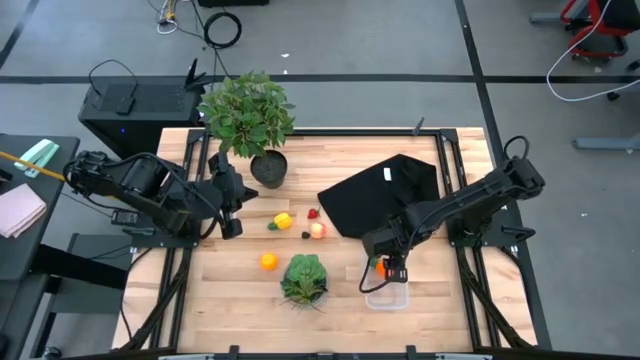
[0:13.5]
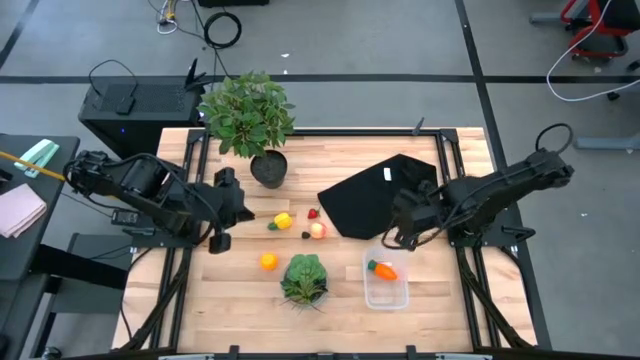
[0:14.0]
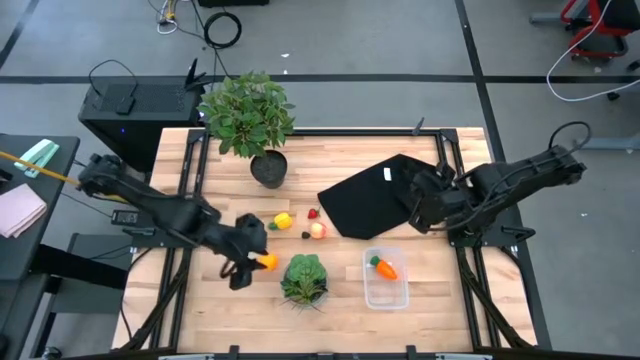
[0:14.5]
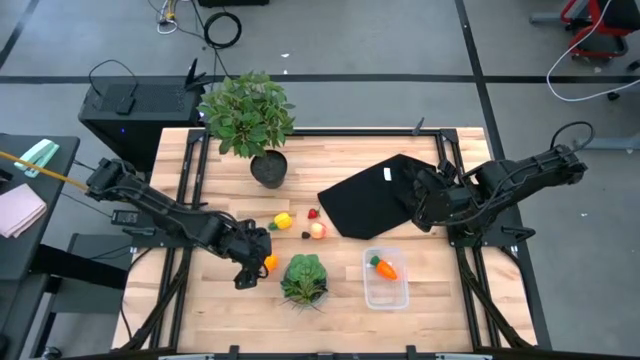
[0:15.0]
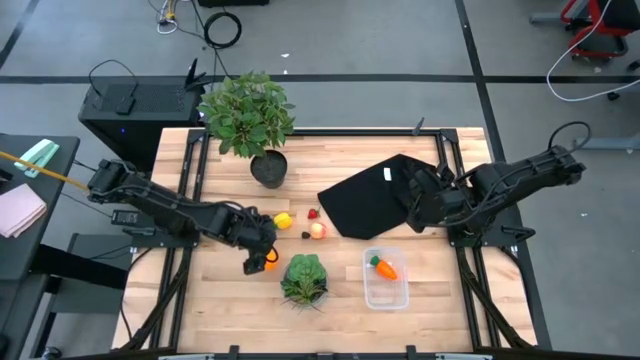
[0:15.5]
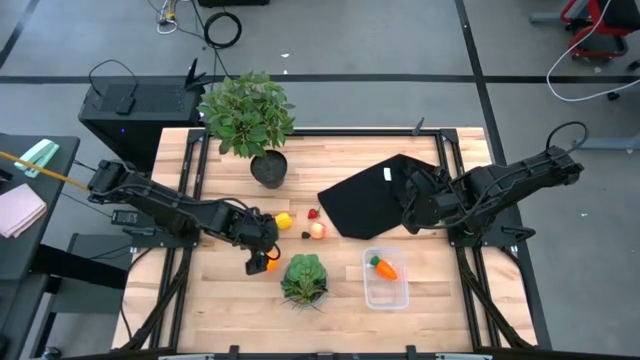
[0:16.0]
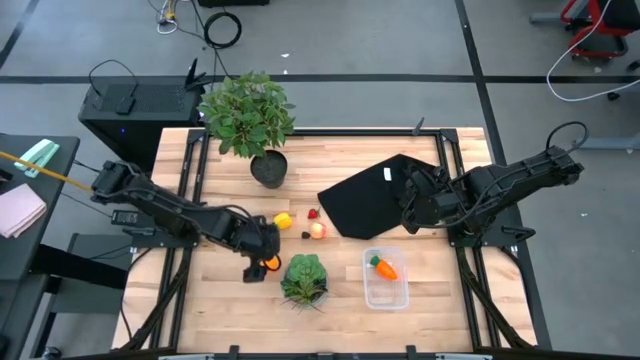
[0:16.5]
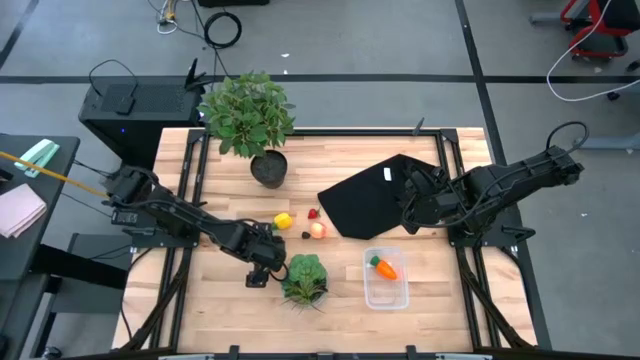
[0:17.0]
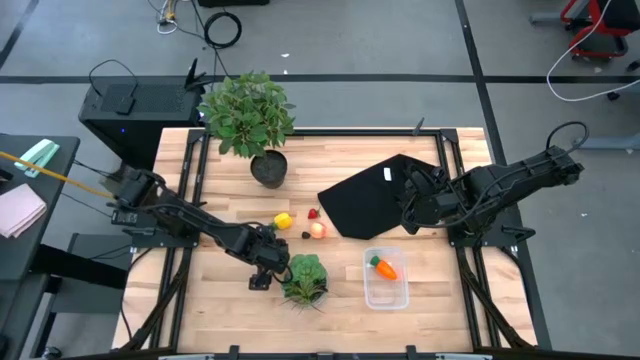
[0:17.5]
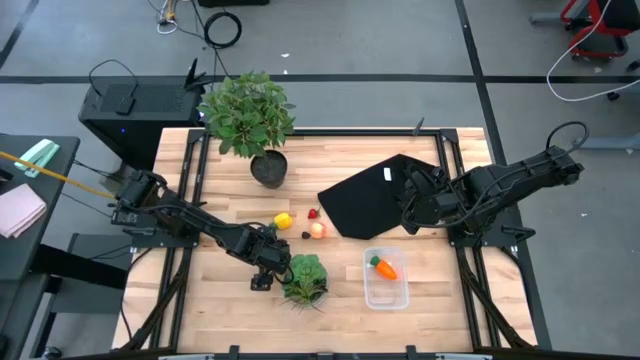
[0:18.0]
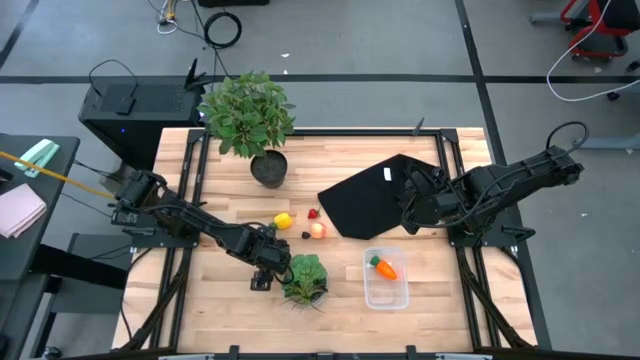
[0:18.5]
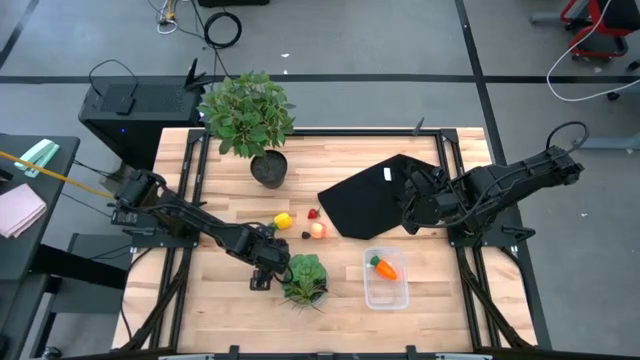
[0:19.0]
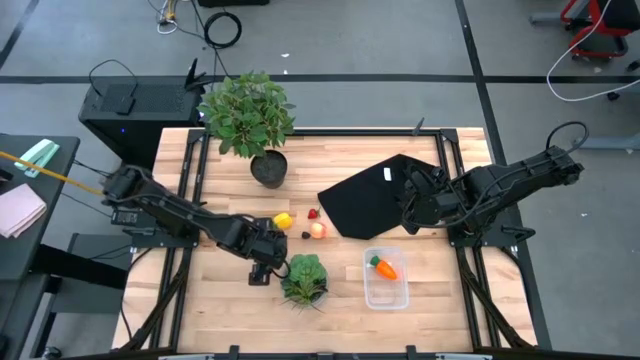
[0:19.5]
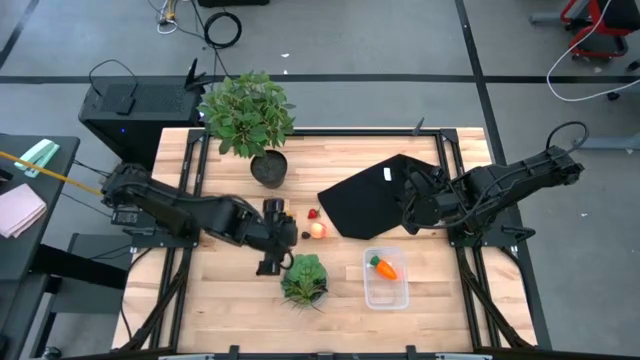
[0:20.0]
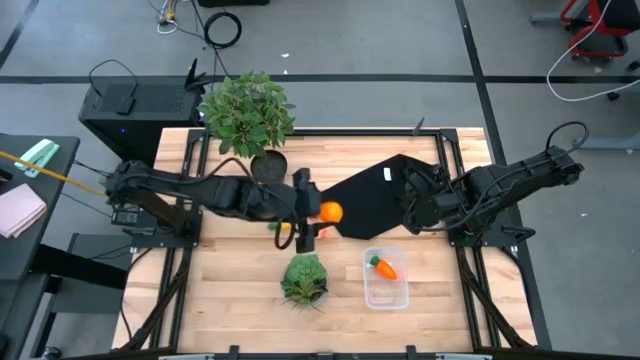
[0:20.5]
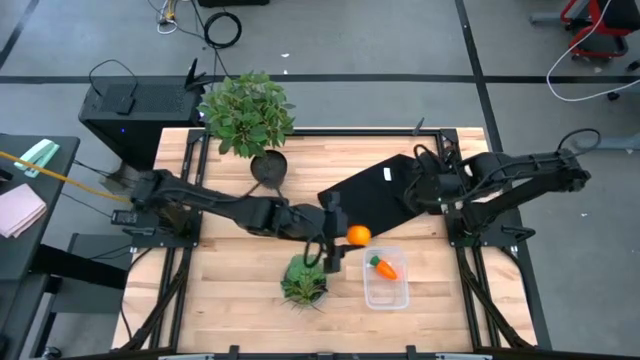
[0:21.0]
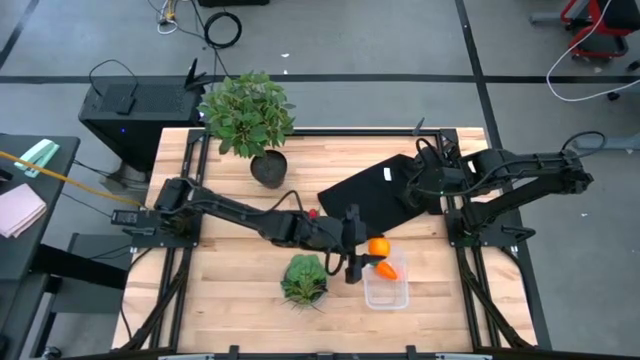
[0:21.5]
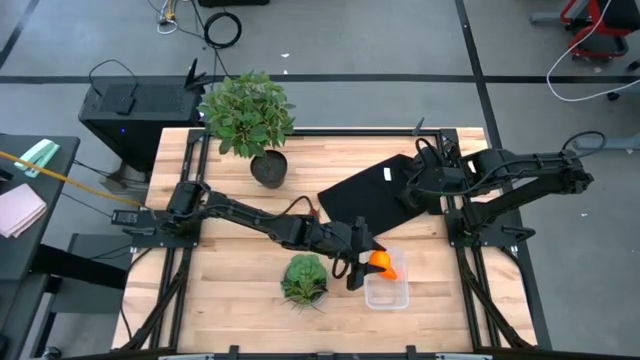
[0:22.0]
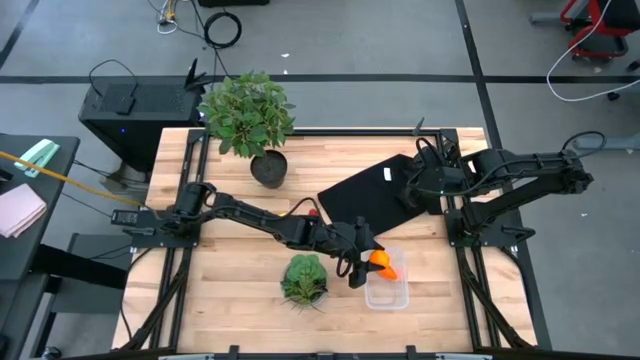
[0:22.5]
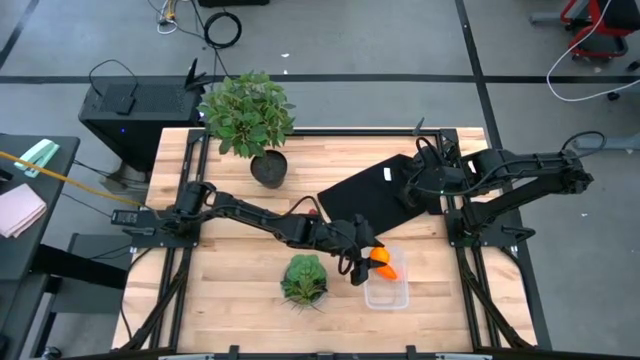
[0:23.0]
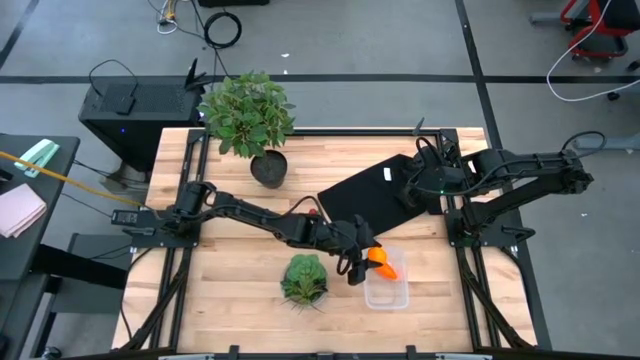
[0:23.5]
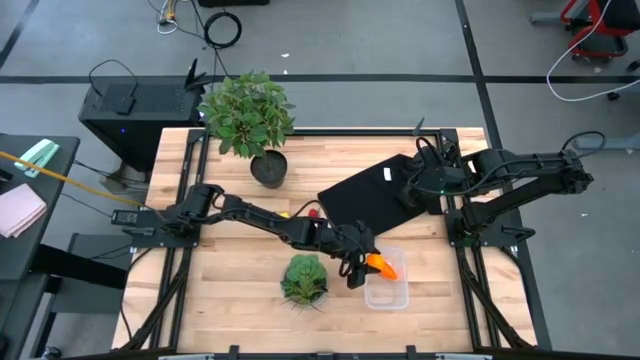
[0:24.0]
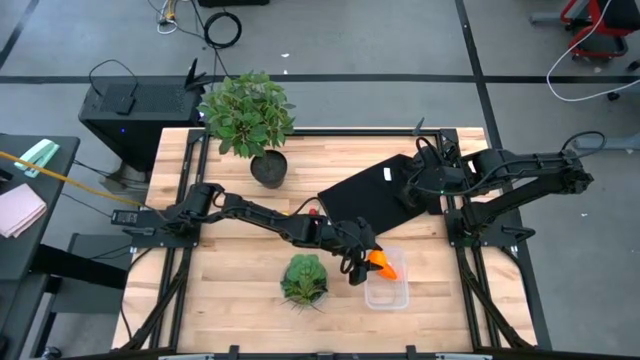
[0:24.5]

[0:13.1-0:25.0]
Task: Pick and placing Produce into tupperware
Put the orange into the transparent bin

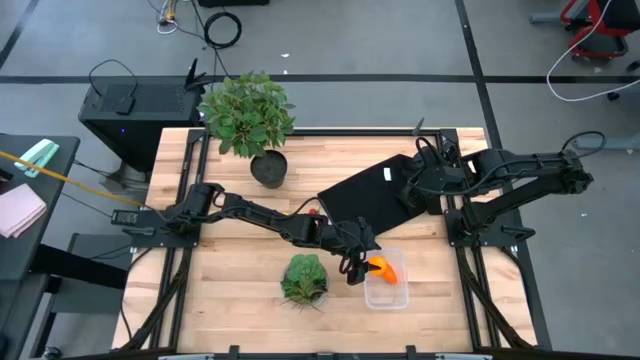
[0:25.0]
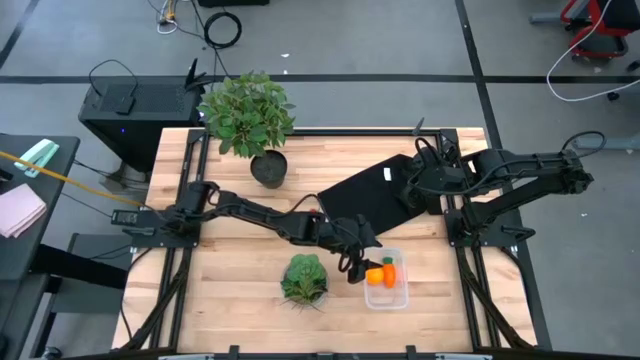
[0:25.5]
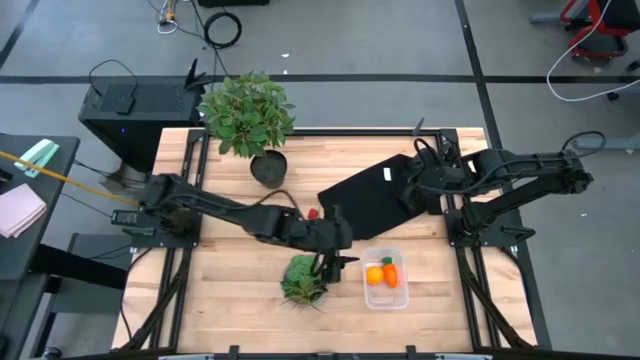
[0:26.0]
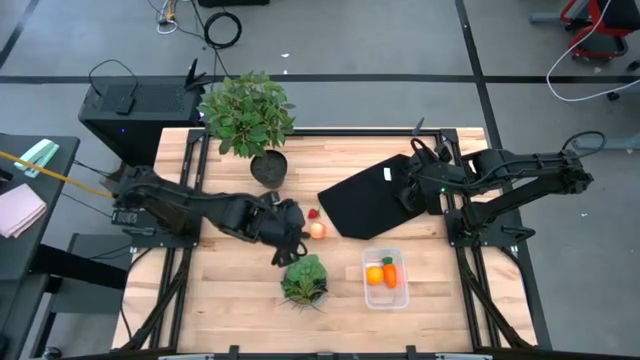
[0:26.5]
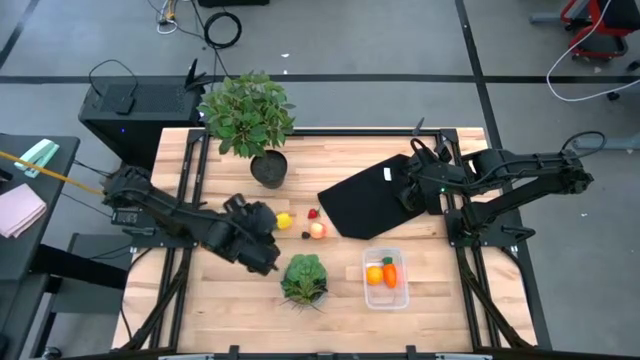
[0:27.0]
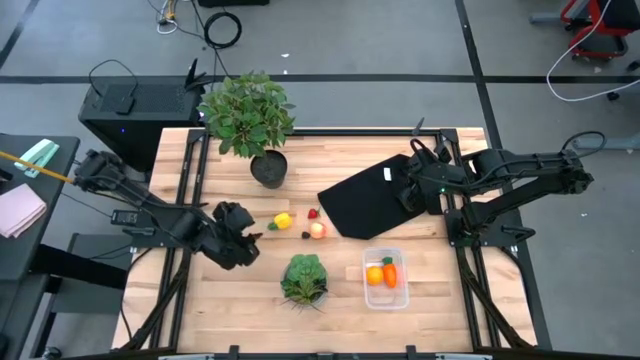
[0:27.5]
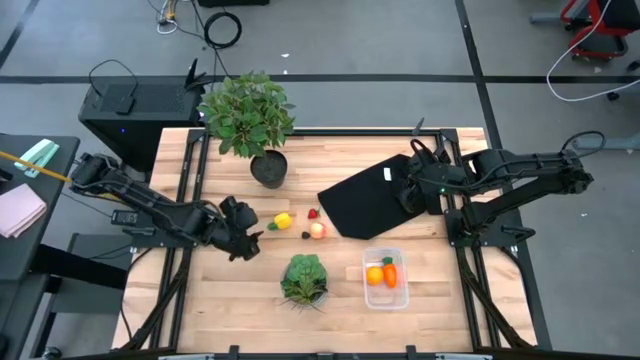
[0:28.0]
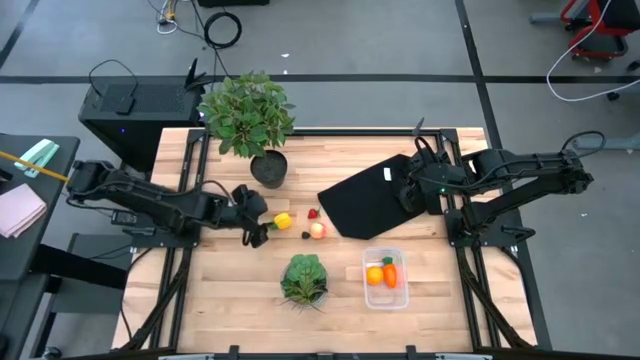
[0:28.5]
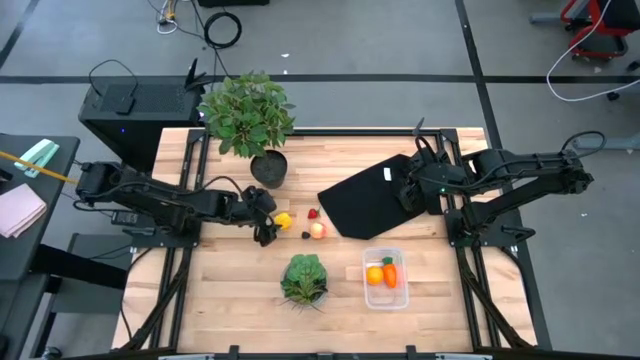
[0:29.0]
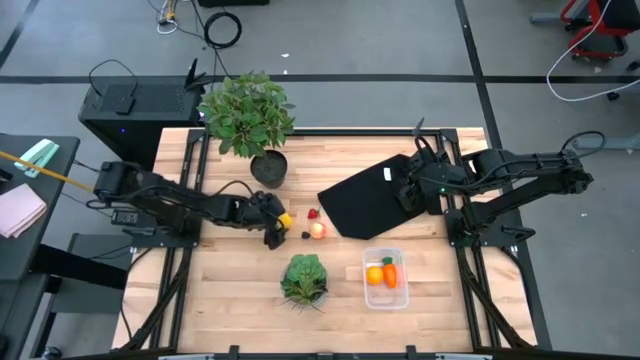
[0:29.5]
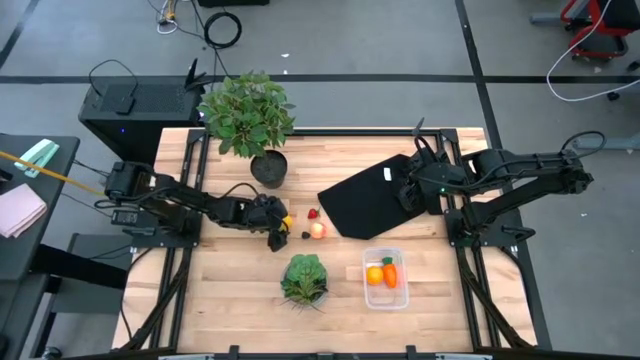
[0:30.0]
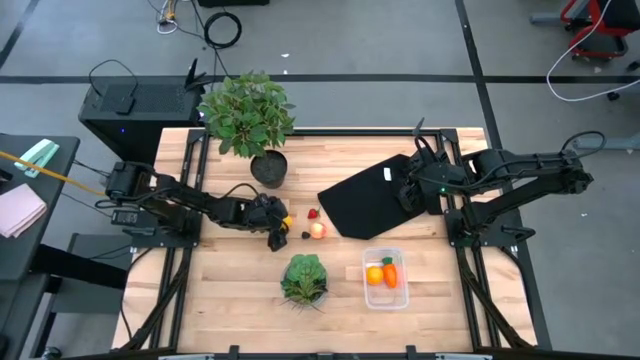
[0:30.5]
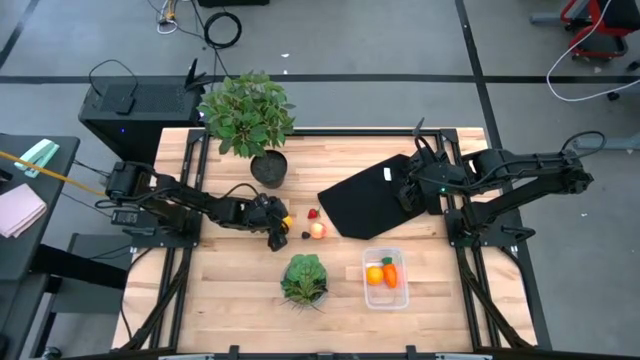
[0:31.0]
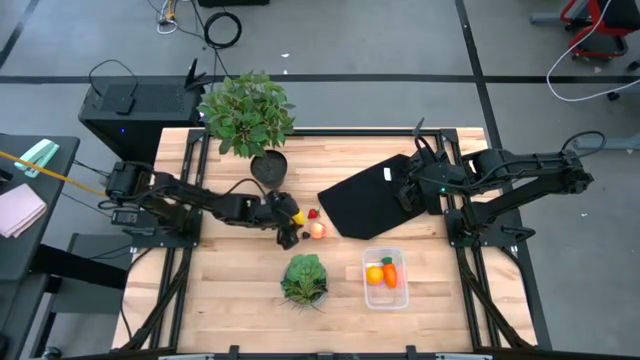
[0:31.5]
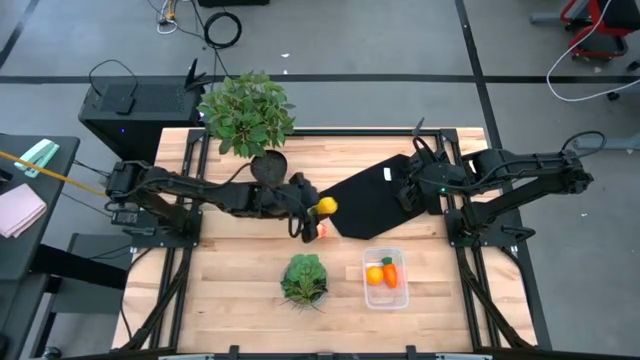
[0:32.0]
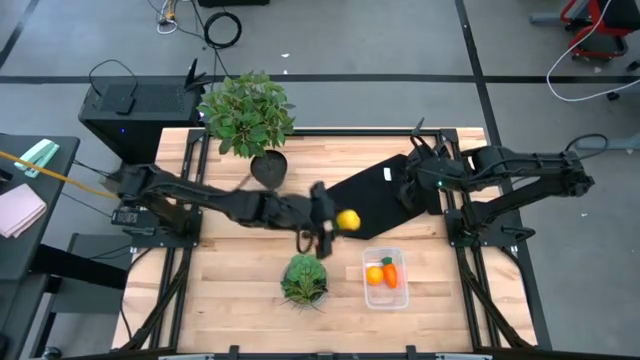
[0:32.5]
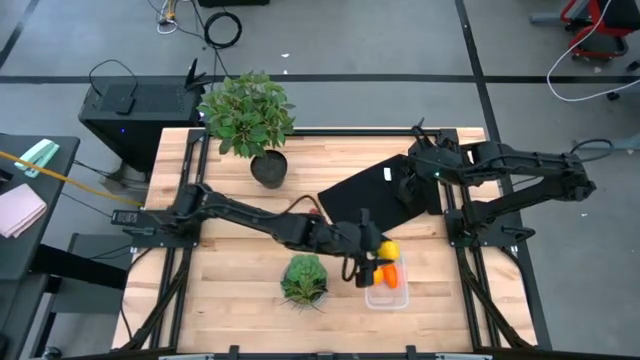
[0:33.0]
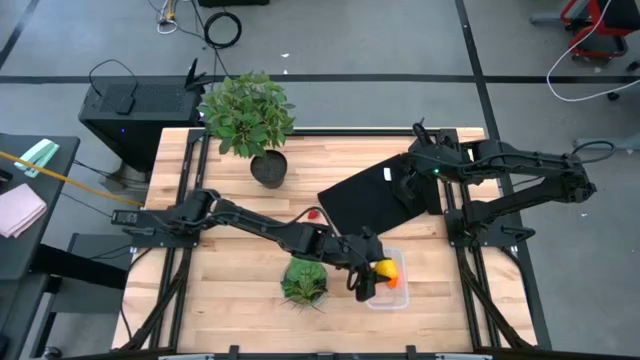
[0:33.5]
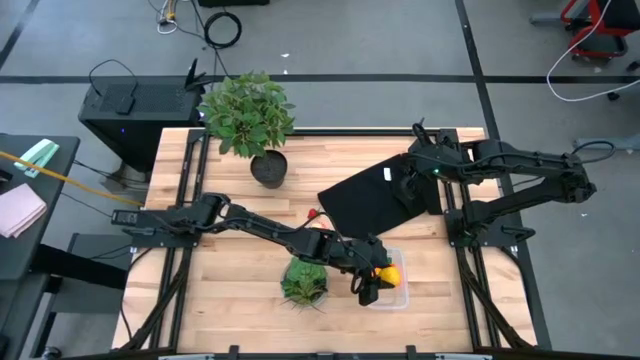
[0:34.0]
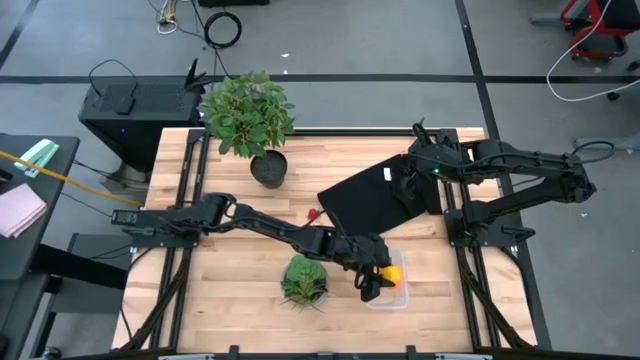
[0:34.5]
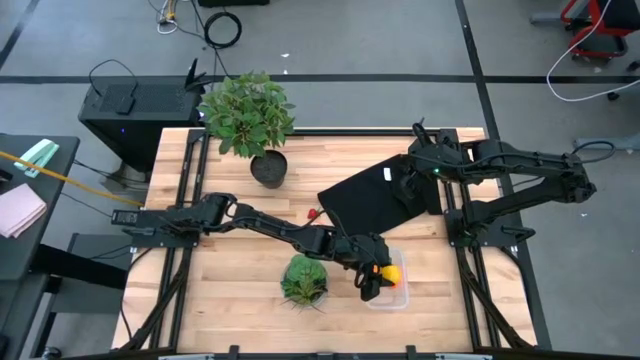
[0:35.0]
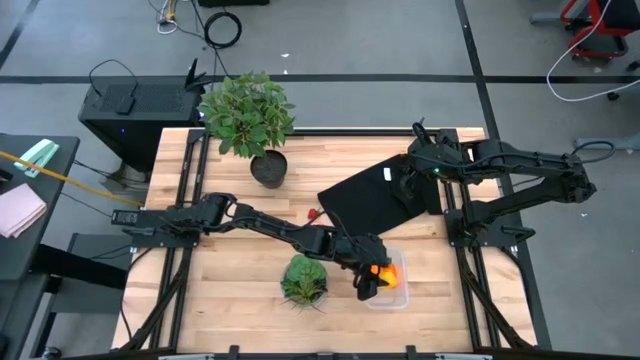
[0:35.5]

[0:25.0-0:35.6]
Put the pineapple into the transparent bin
